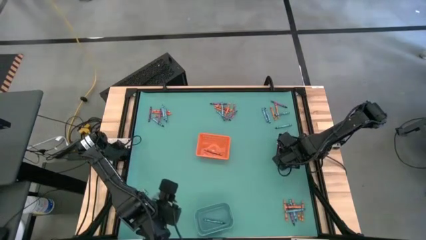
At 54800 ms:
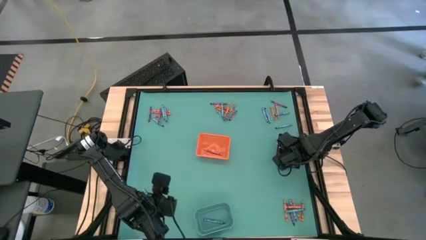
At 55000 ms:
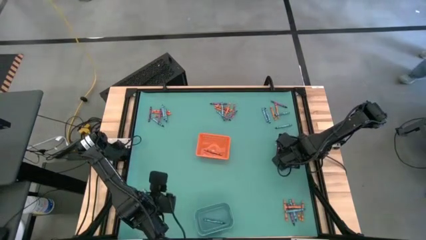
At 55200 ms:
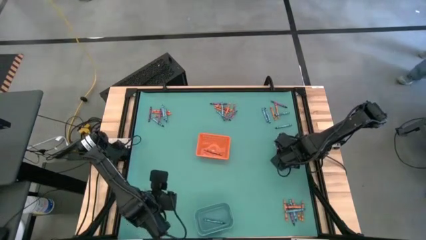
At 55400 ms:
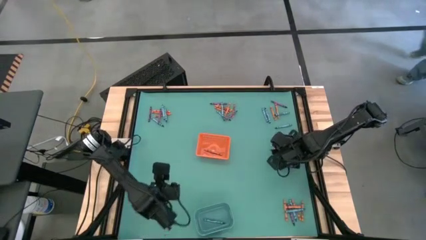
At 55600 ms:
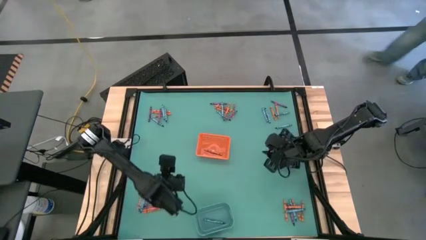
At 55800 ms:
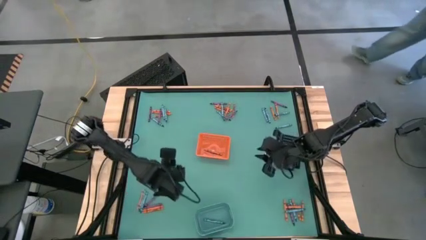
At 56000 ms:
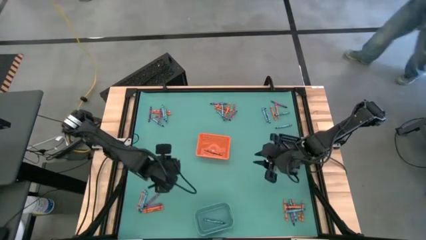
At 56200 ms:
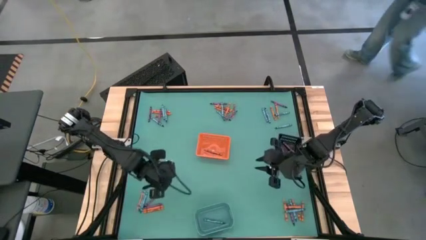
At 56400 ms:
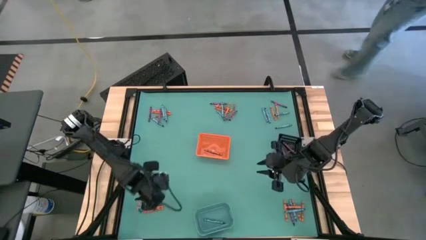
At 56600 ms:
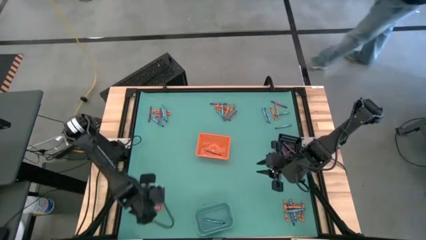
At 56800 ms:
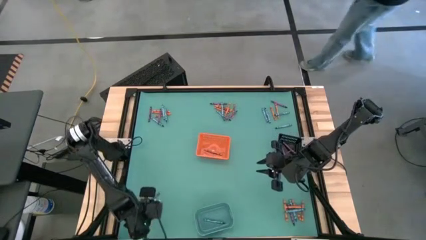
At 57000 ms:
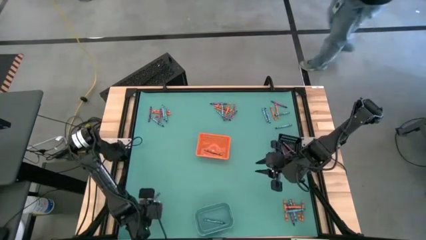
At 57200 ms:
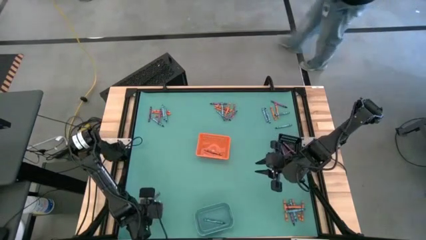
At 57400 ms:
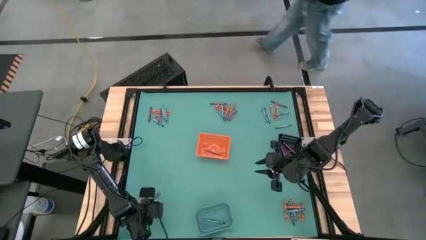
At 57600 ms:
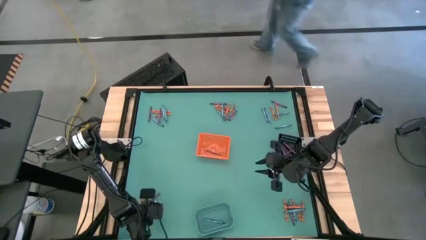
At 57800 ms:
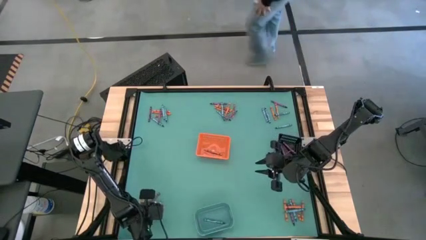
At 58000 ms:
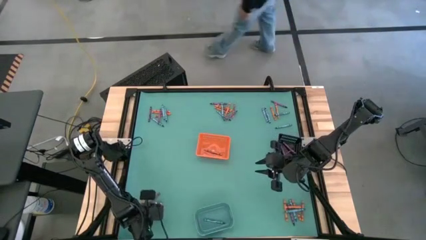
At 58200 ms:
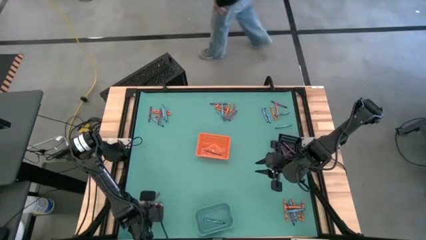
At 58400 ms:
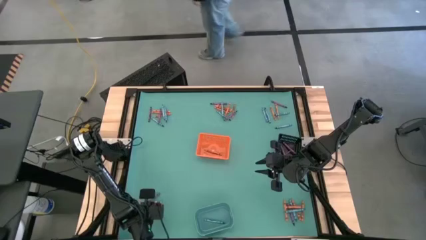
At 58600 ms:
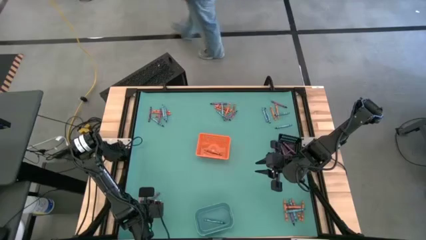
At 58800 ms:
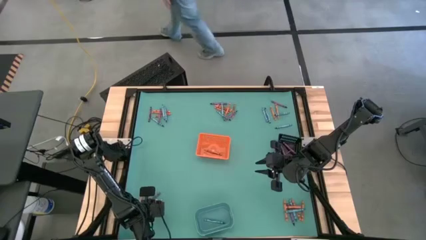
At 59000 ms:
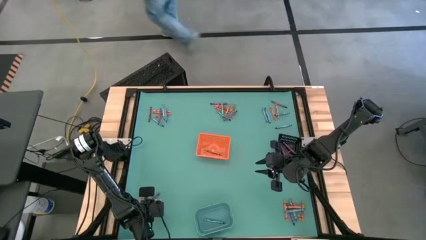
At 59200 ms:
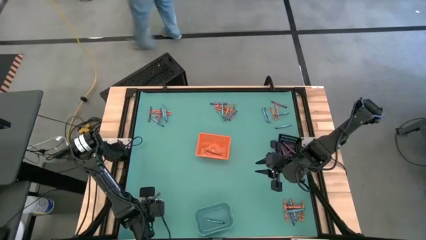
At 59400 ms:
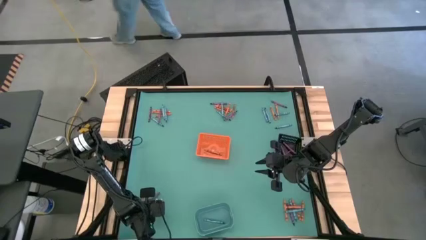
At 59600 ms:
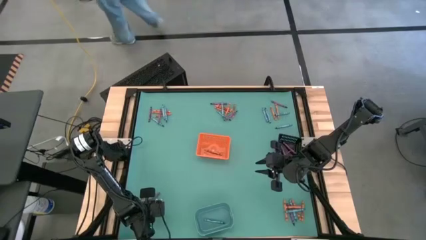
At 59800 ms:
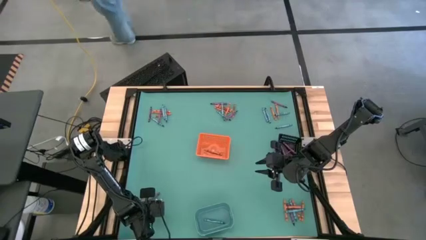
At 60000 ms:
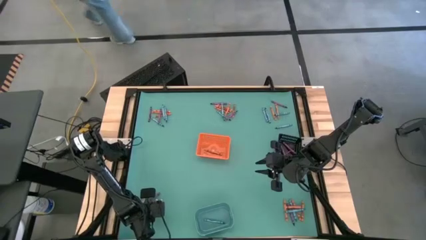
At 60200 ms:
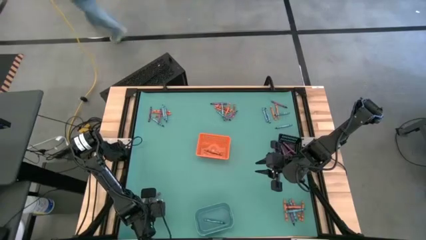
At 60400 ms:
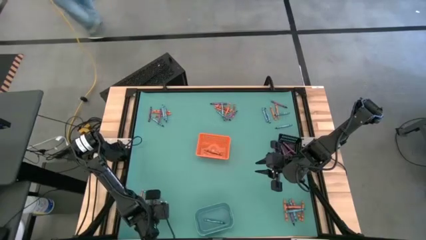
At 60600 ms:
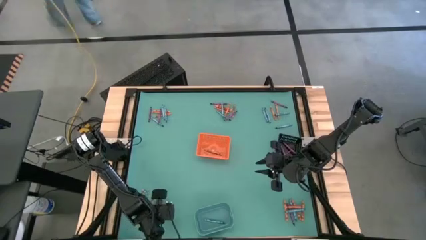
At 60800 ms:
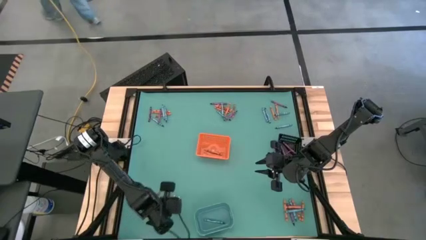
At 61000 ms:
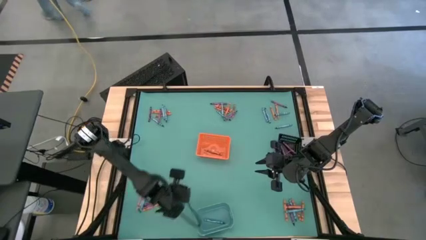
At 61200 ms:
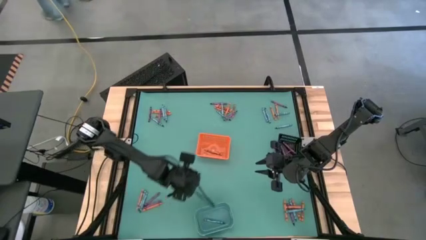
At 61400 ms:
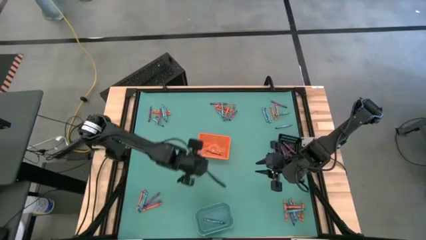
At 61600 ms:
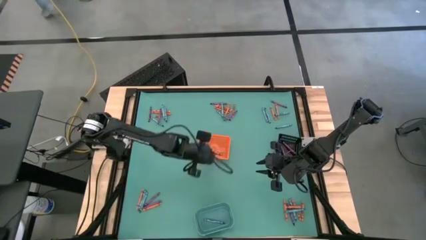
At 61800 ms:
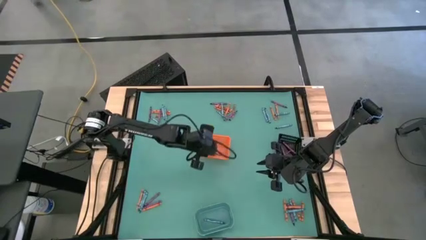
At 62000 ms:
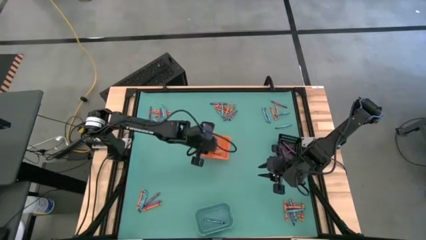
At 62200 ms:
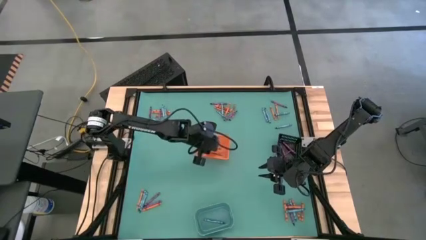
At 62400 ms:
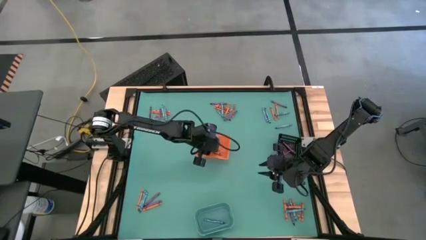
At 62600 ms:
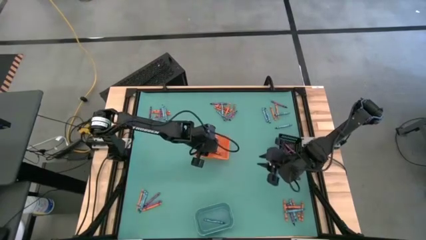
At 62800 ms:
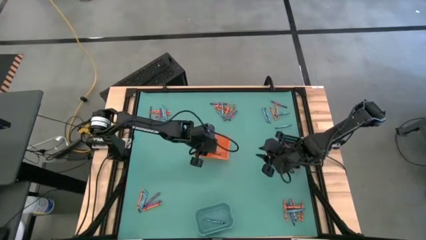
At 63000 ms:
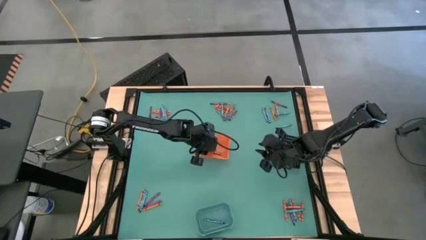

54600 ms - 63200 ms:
Task: Sort crayons
Put the orange crayon into the orange bin

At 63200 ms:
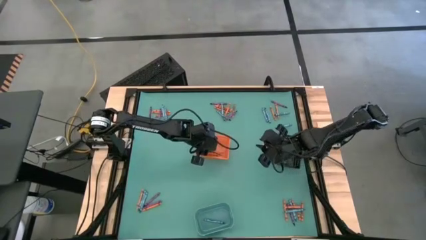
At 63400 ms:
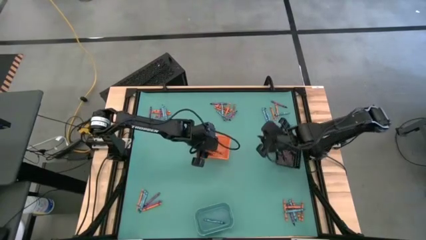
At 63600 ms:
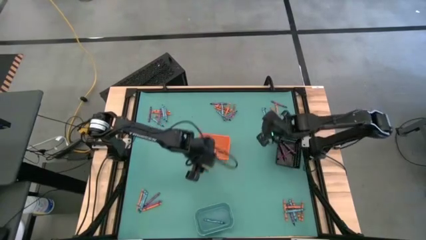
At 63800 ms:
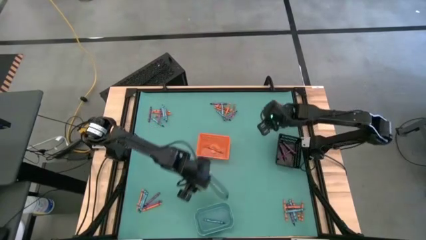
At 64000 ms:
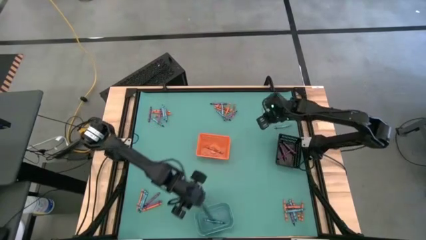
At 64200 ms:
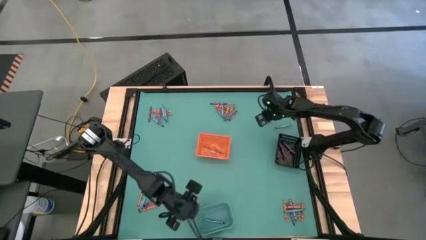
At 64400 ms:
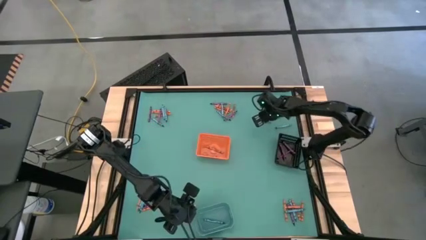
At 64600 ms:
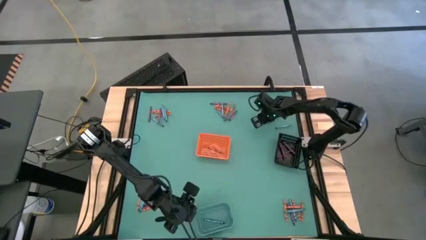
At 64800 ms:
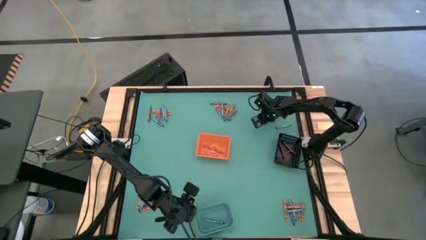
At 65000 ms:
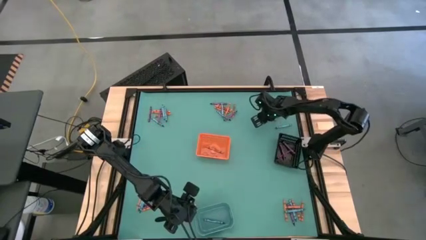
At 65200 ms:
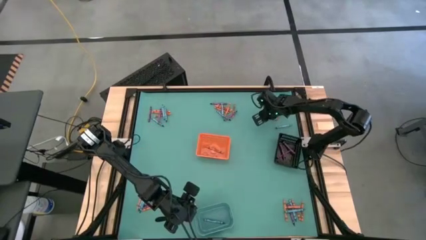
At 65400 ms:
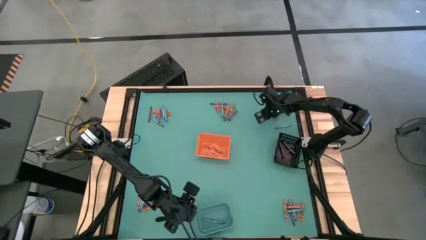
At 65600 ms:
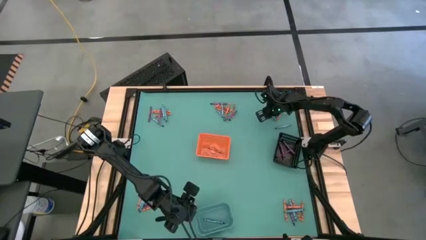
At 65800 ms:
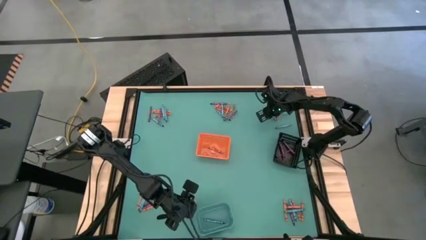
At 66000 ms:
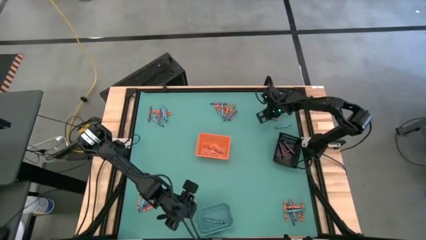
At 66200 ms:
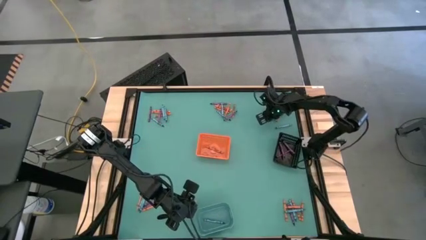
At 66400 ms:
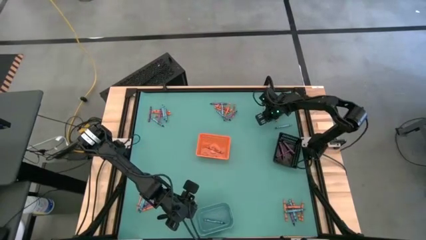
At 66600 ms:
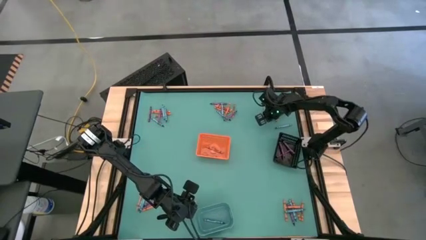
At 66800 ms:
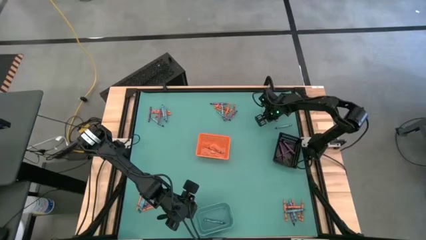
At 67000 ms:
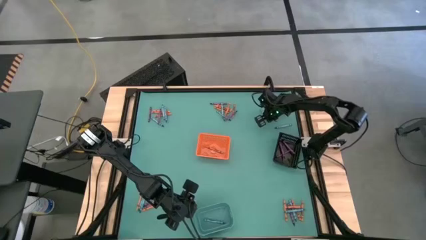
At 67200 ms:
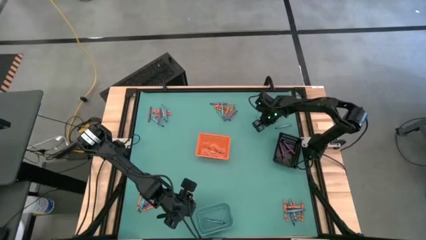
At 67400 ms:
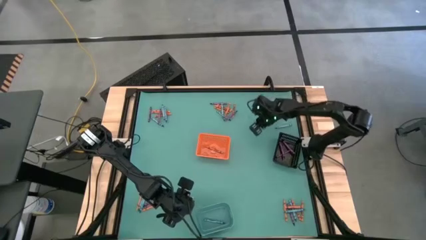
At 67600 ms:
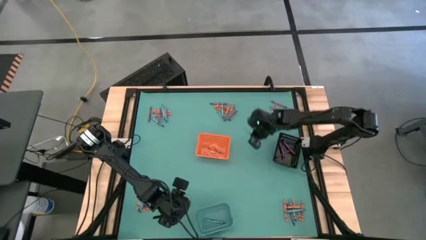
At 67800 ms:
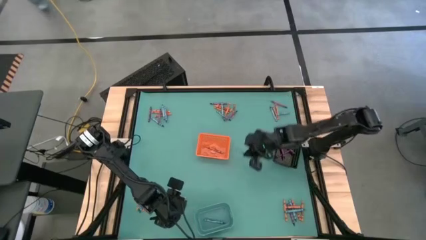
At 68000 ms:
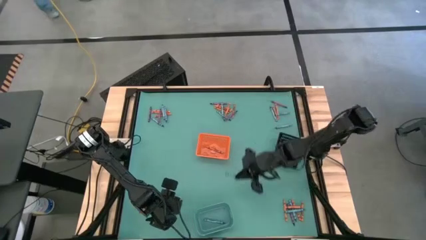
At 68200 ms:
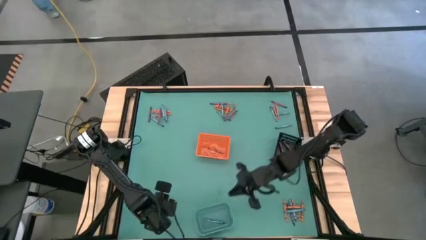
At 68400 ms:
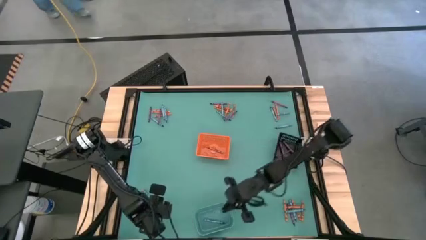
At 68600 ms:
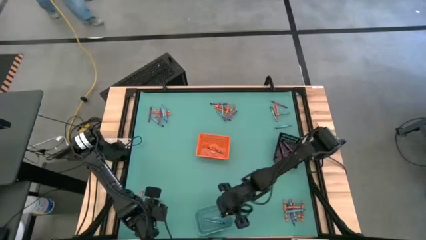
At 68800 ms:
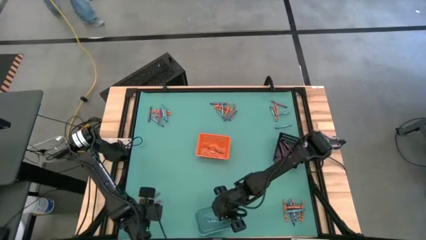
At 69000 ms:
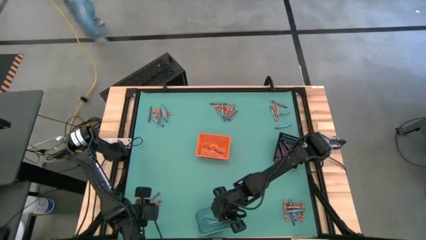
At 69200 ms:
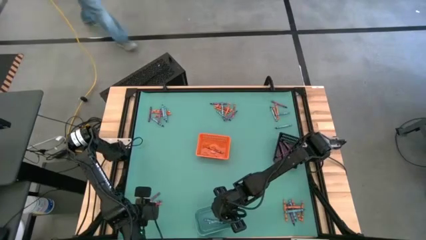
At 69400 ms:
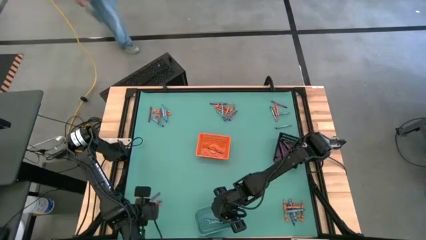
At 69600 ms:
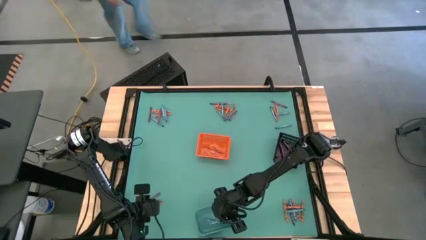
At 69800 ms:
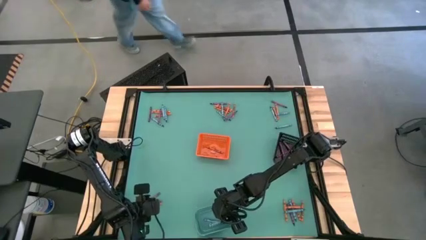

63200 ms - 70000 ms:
Put the blue crayon into the blue bin
